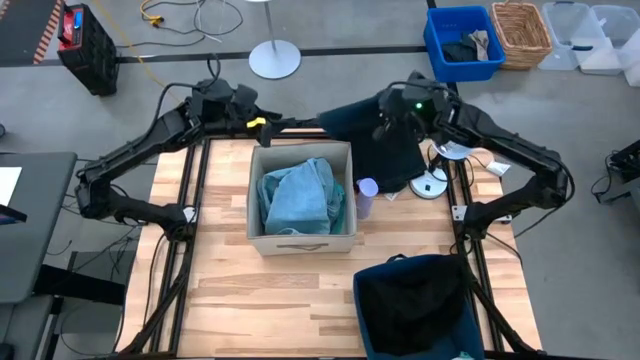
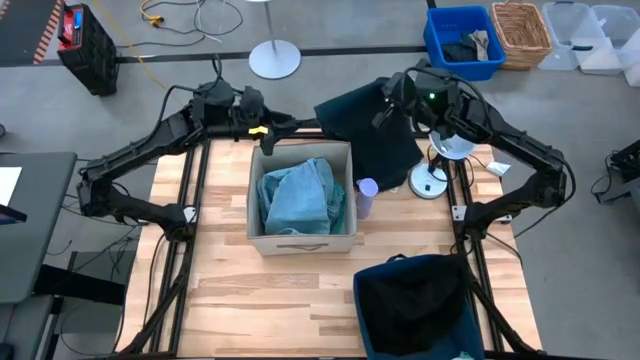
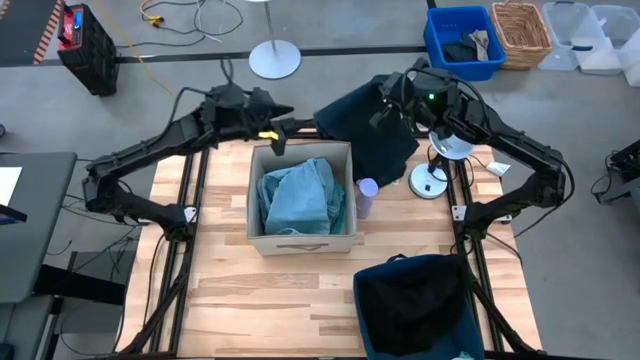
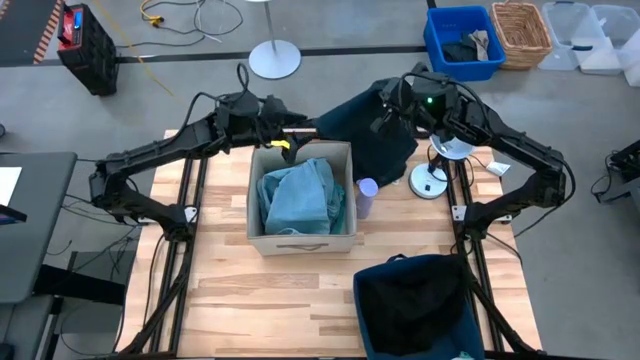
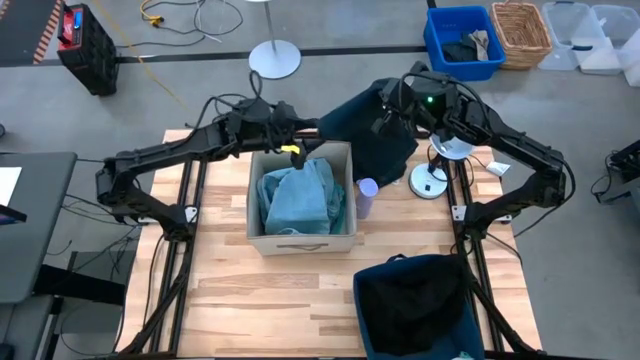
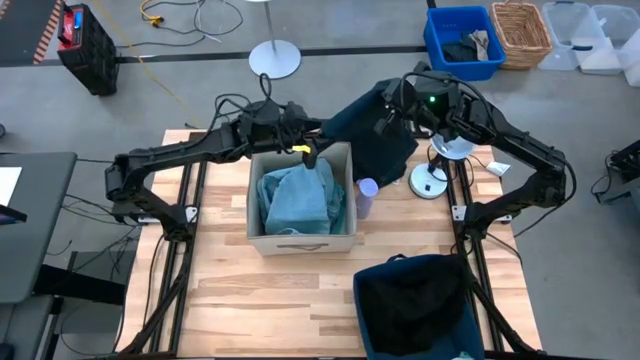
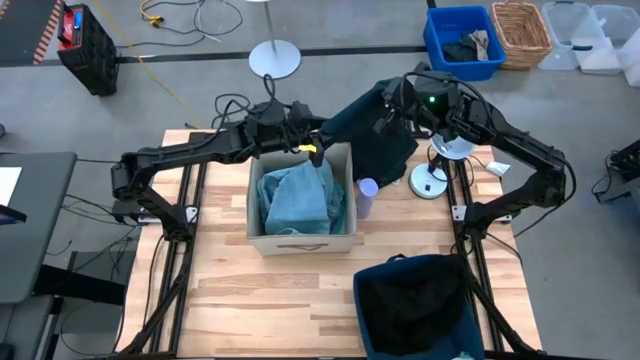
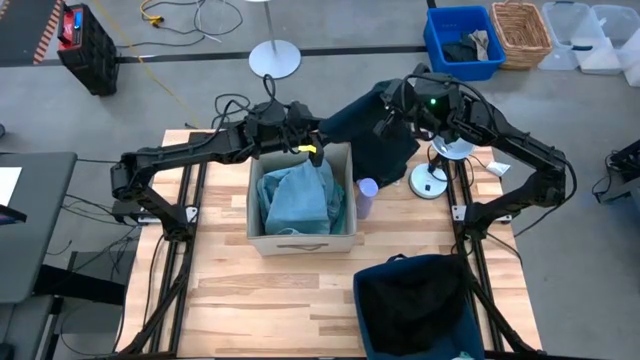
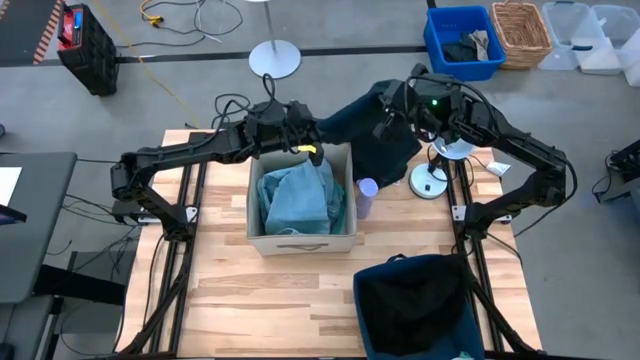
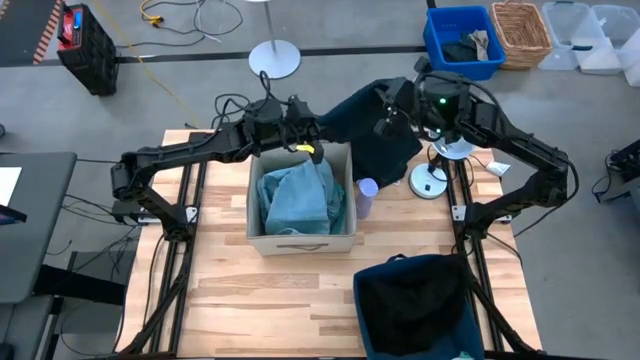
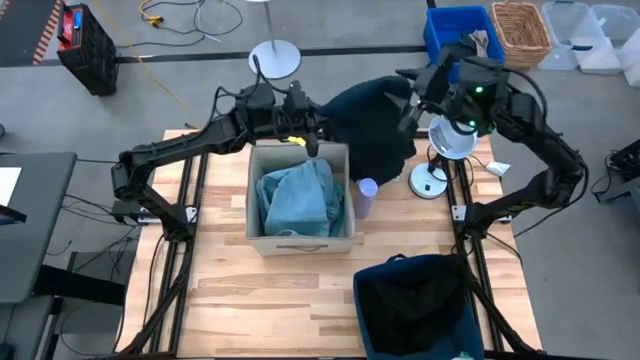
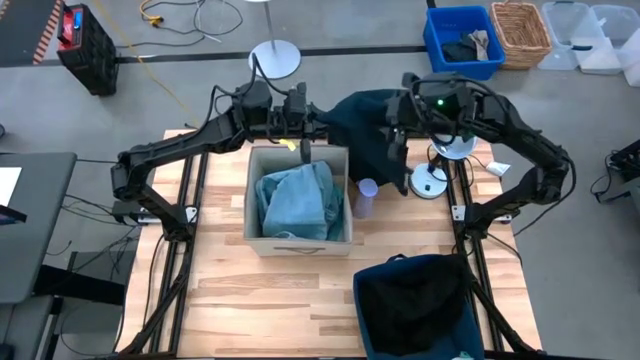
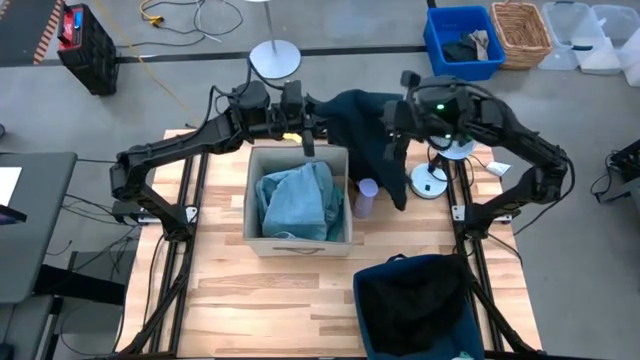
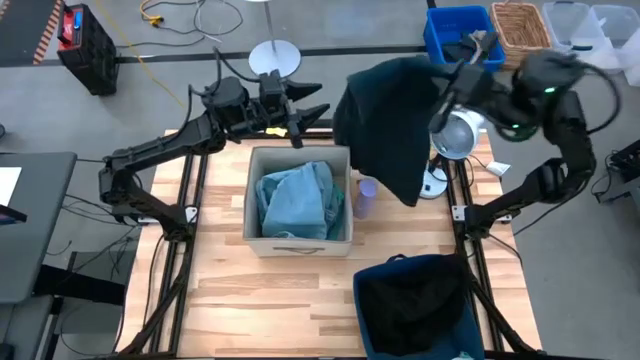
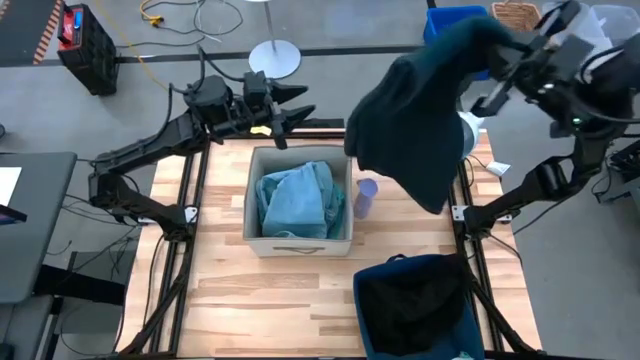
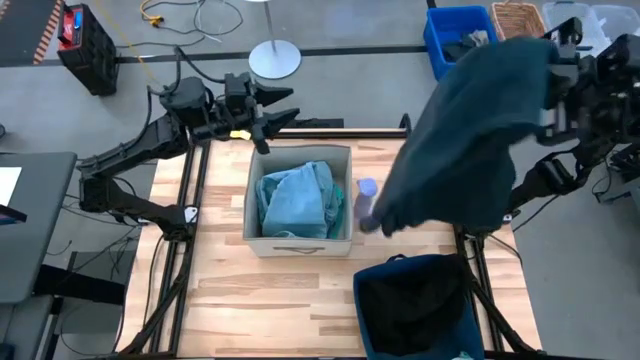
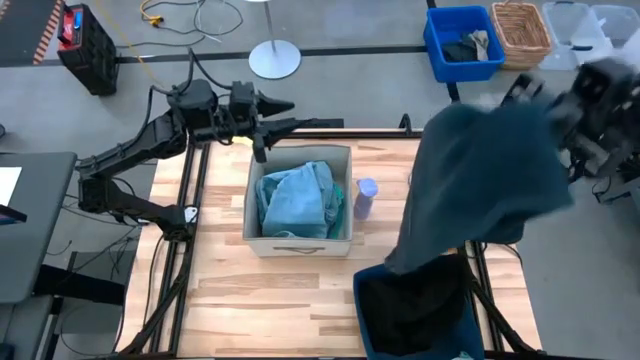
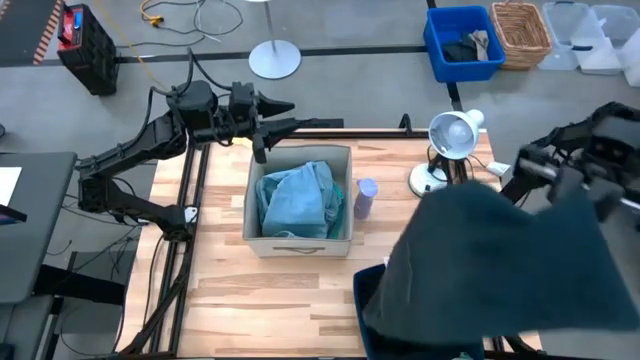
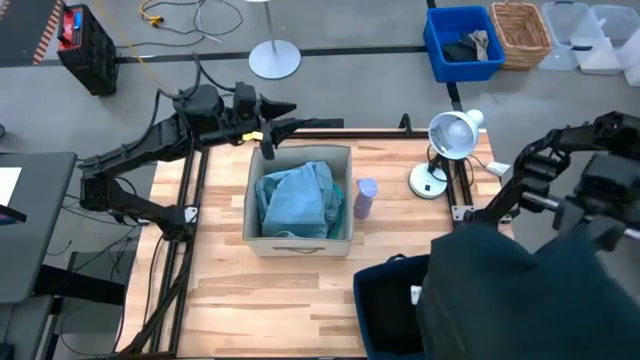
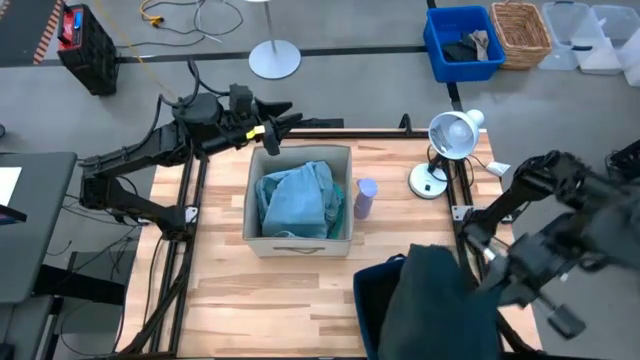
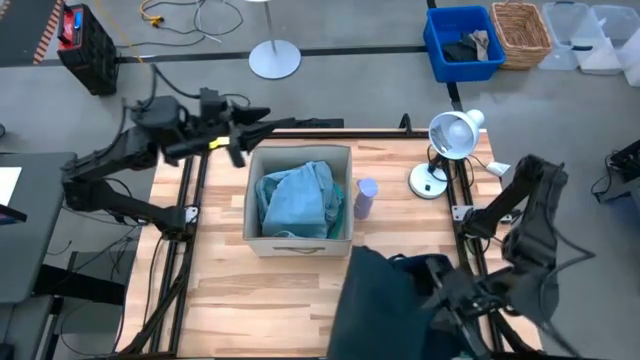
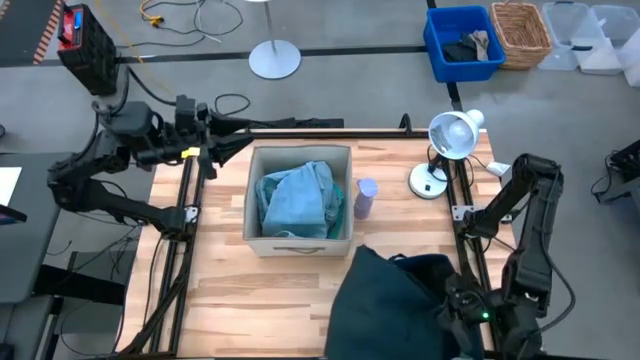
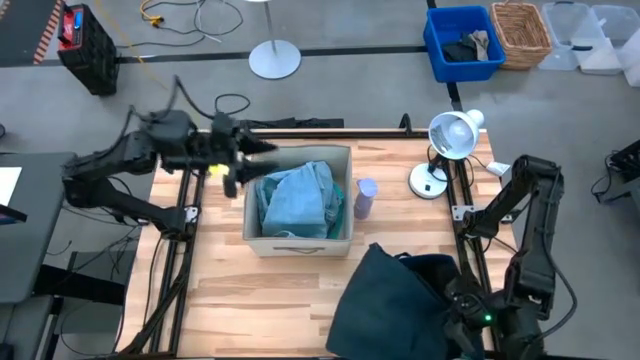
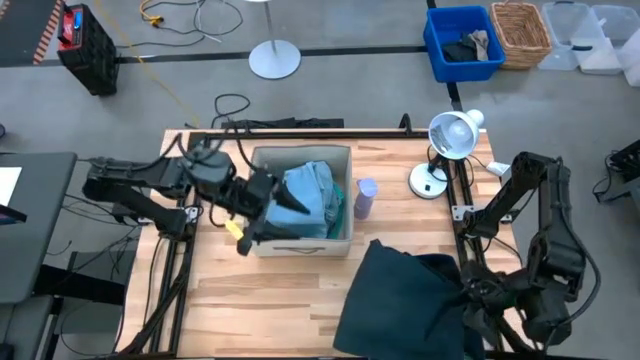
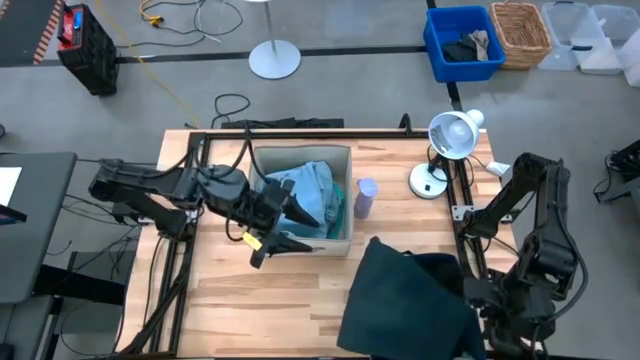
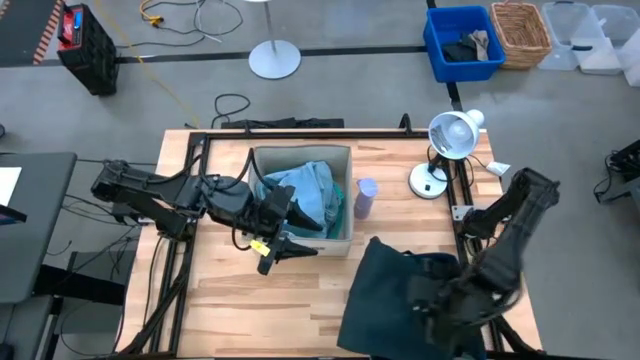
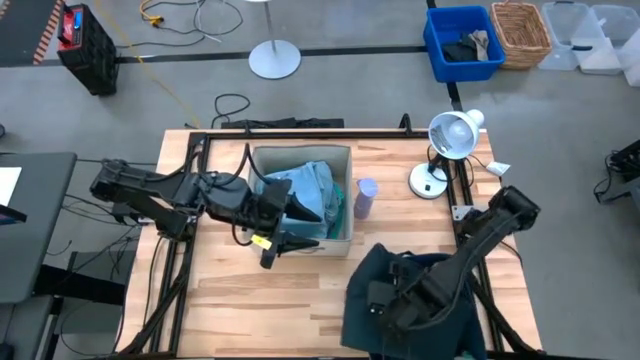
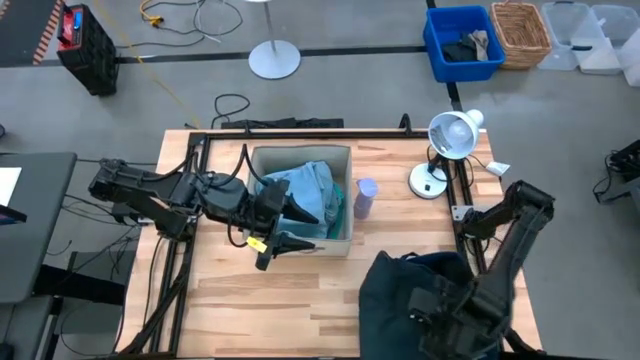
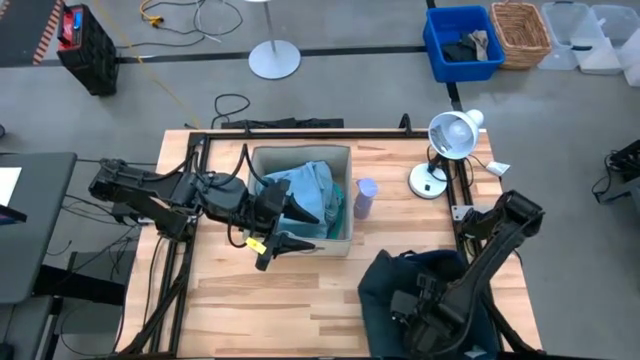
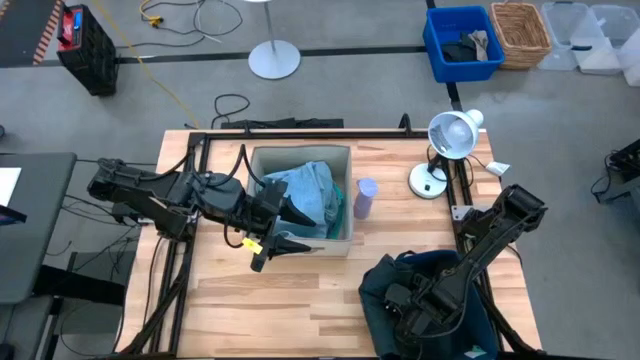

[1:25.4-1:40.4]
Task: Sort clothes
Put the black pants into the blue laundry bin

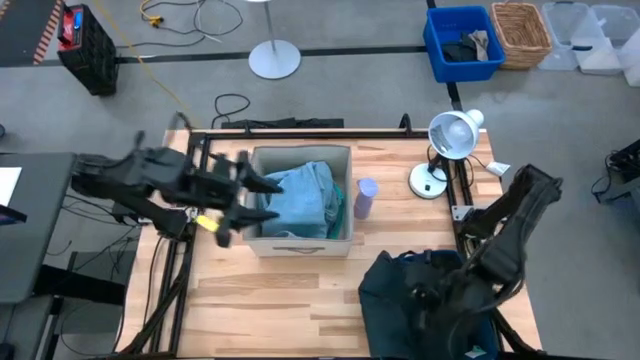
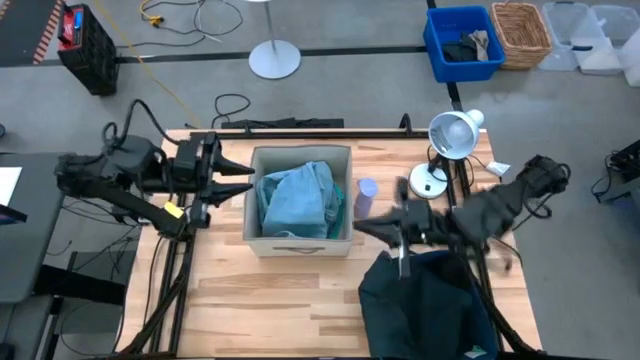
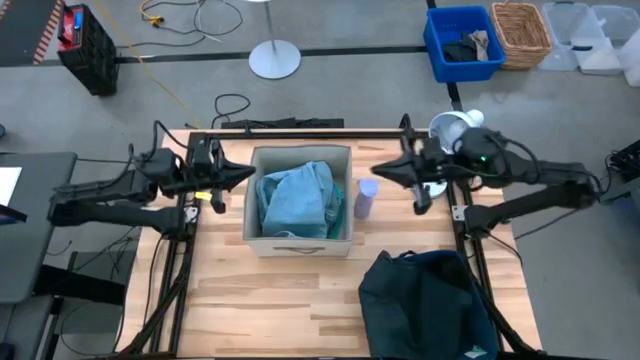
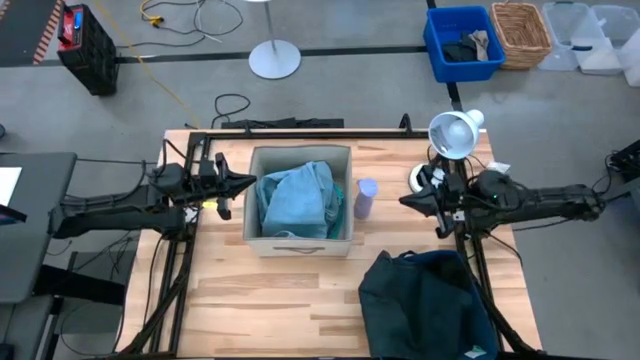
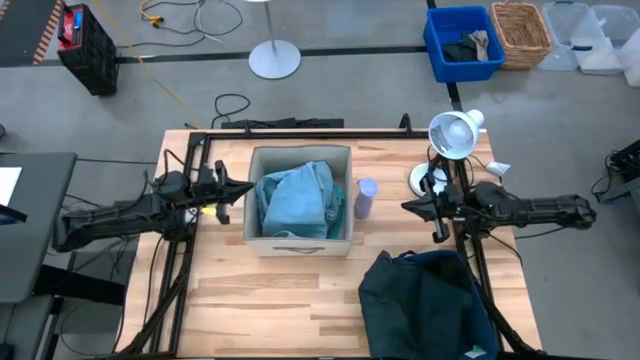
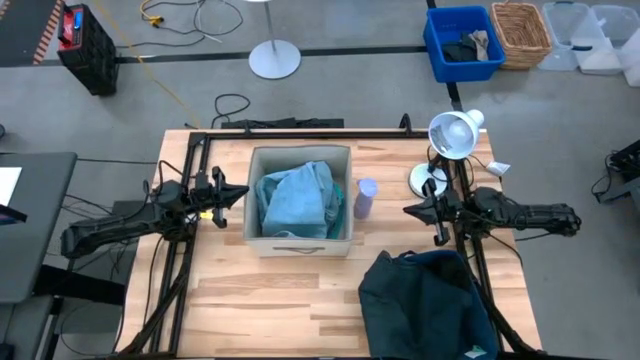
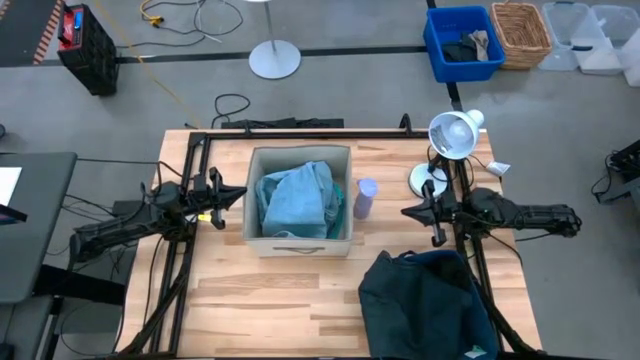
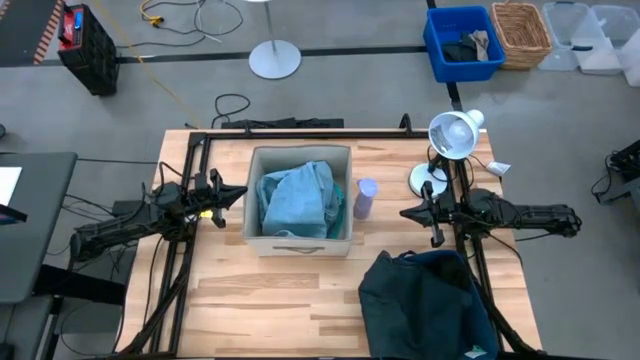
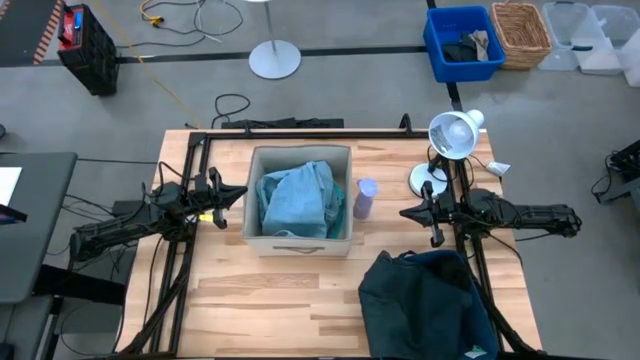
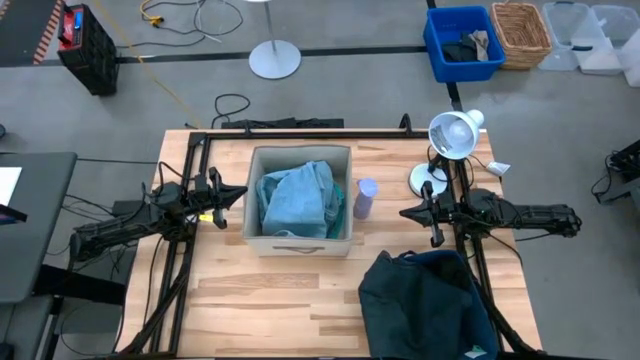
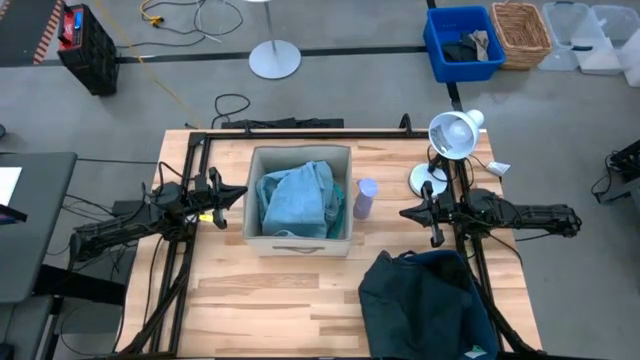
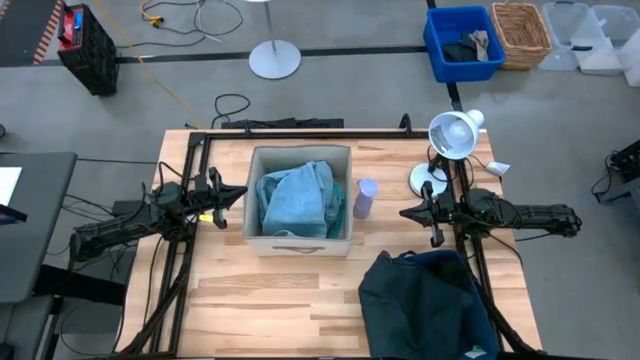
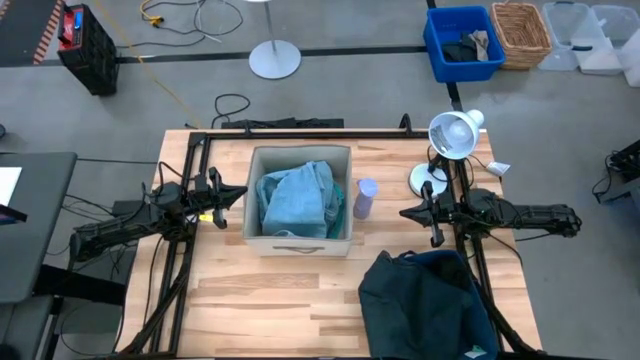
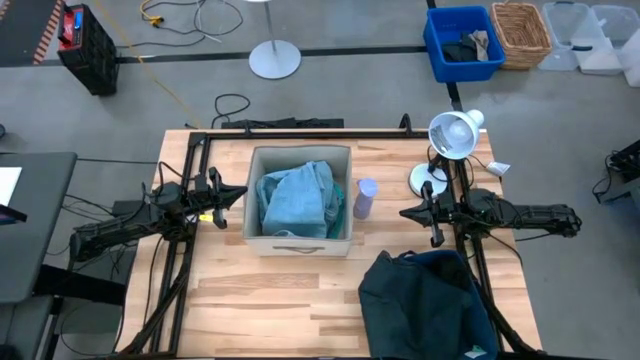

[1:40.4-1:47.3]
Return to Home Position
